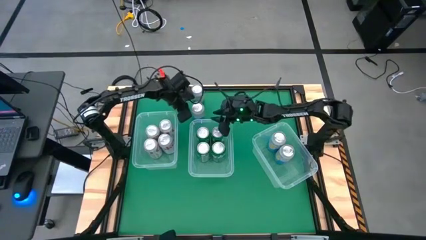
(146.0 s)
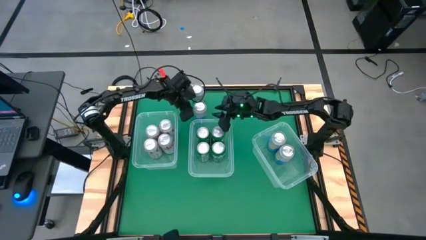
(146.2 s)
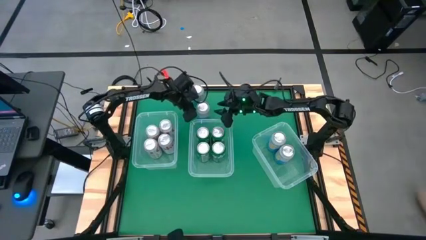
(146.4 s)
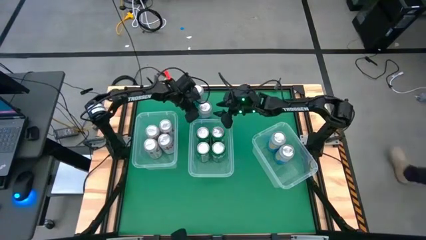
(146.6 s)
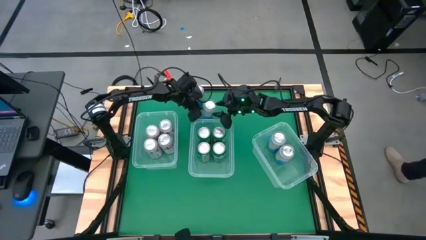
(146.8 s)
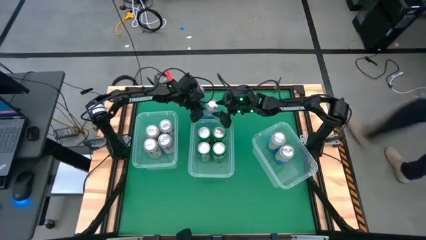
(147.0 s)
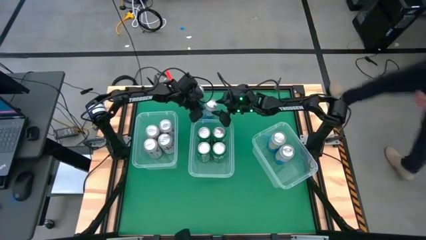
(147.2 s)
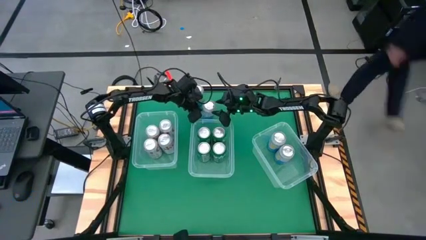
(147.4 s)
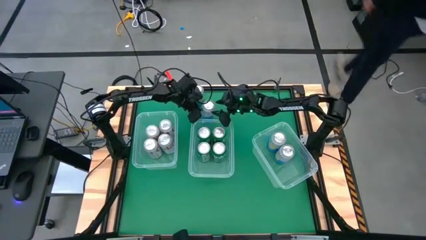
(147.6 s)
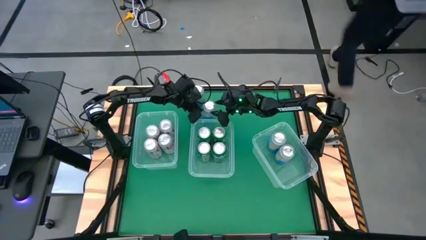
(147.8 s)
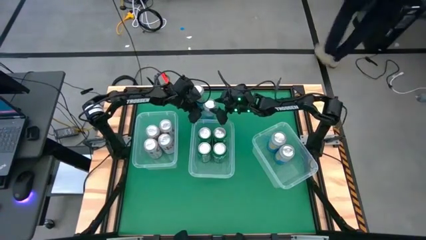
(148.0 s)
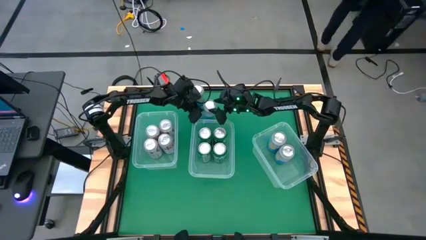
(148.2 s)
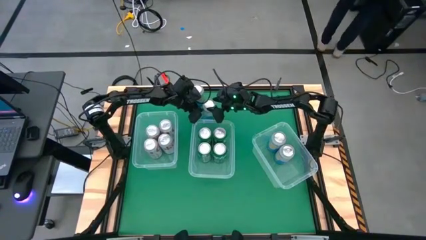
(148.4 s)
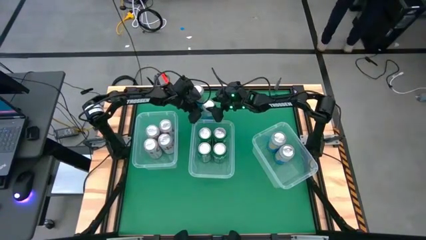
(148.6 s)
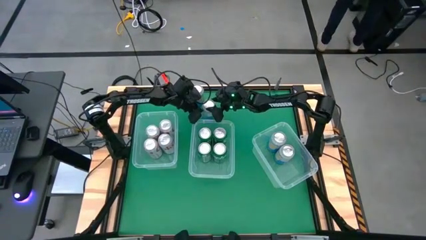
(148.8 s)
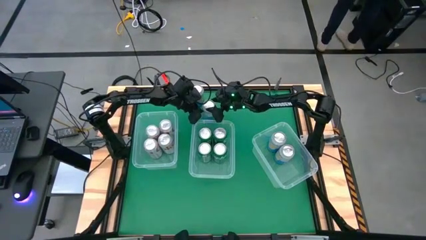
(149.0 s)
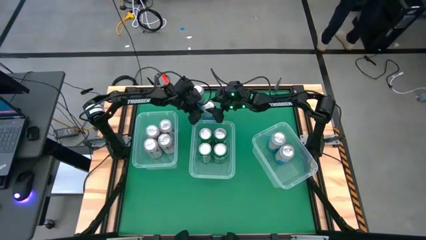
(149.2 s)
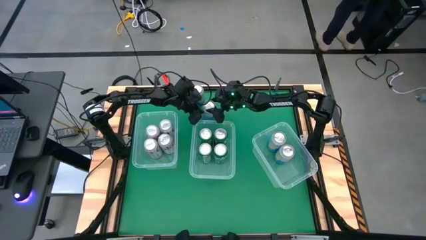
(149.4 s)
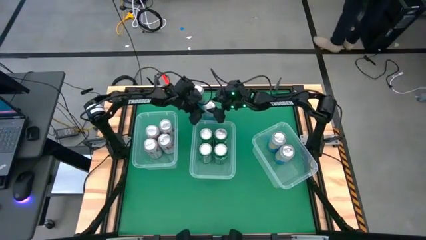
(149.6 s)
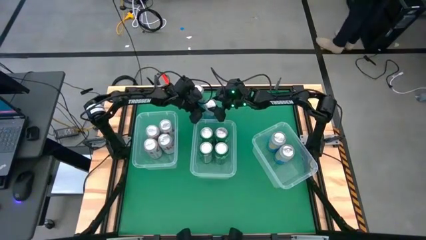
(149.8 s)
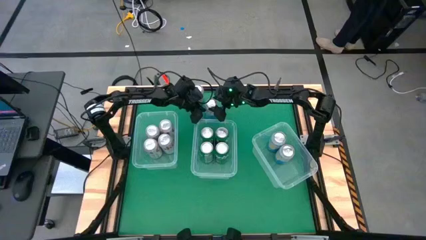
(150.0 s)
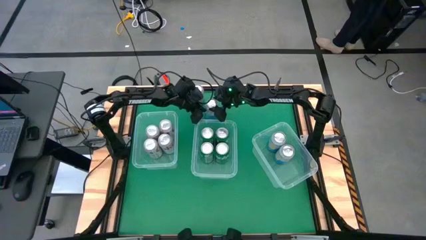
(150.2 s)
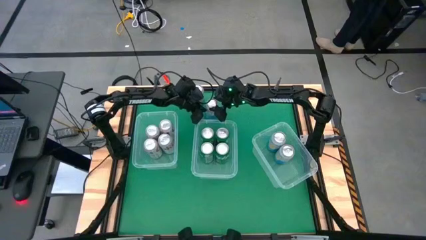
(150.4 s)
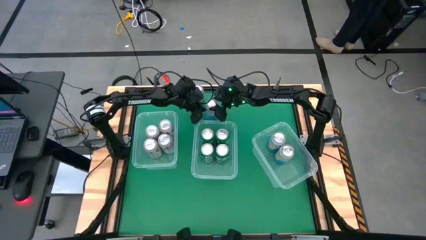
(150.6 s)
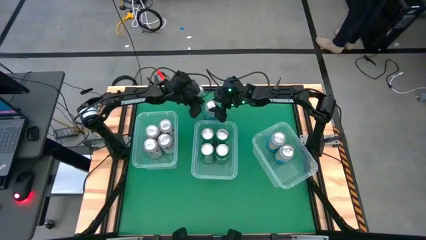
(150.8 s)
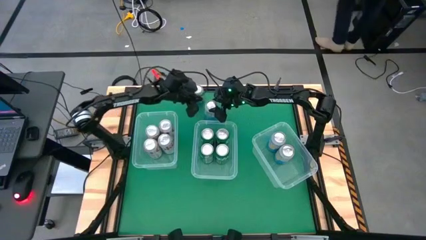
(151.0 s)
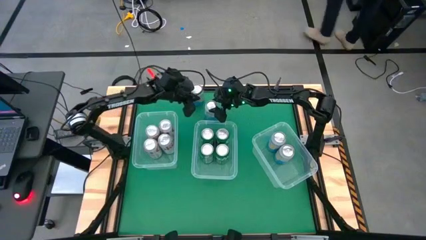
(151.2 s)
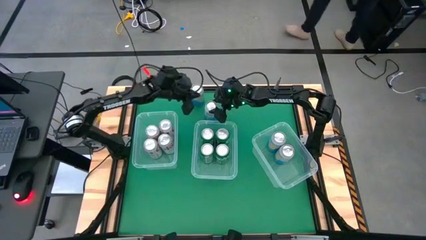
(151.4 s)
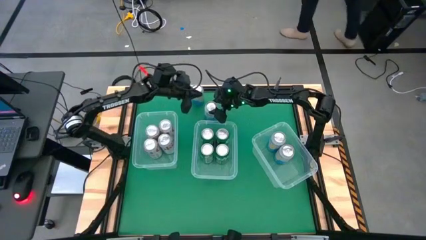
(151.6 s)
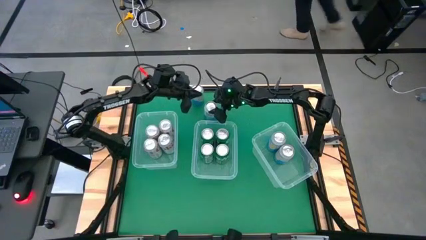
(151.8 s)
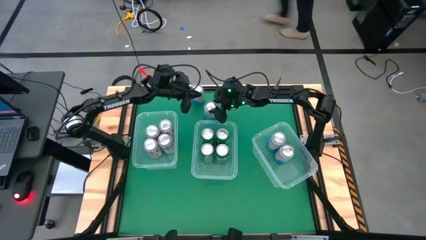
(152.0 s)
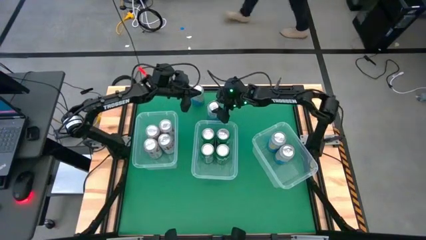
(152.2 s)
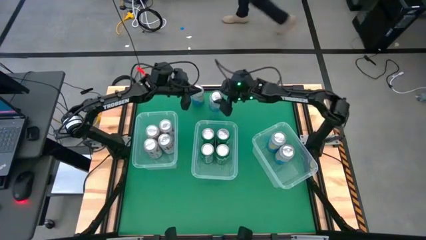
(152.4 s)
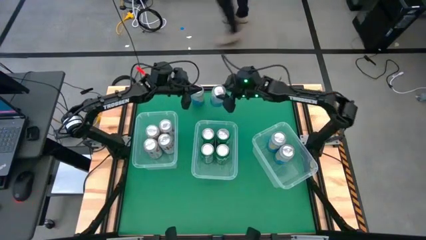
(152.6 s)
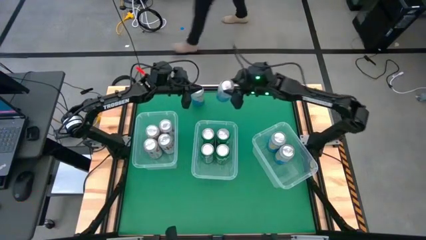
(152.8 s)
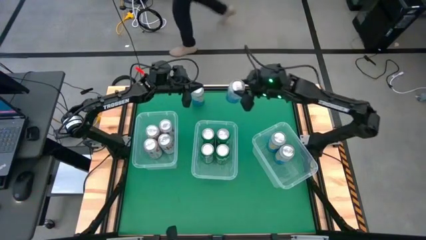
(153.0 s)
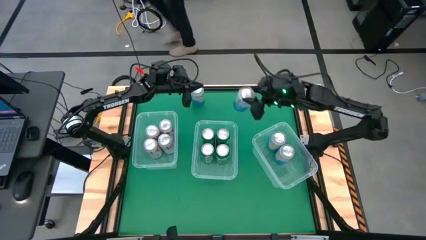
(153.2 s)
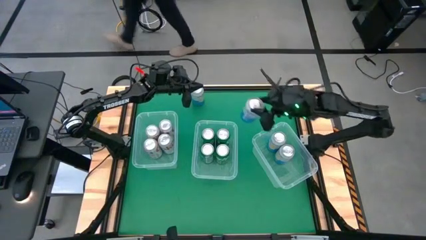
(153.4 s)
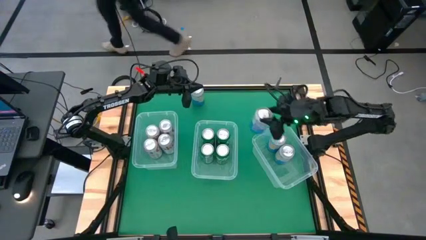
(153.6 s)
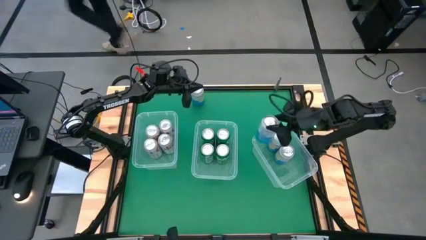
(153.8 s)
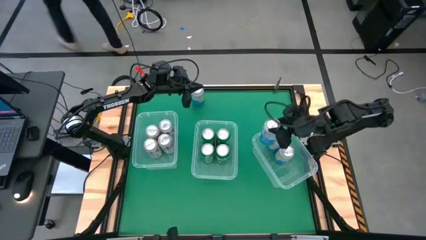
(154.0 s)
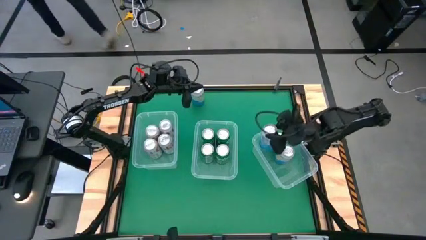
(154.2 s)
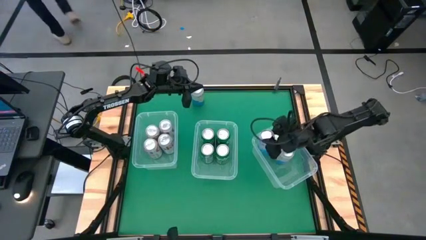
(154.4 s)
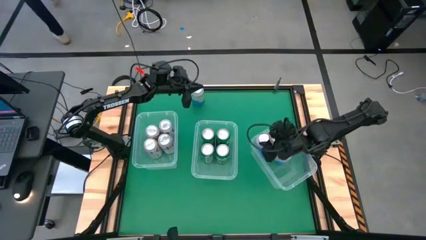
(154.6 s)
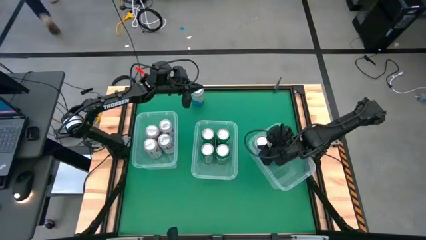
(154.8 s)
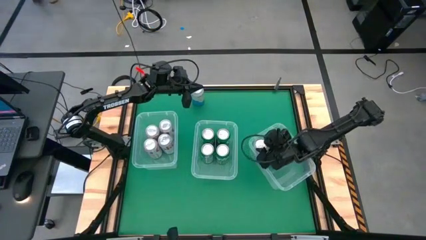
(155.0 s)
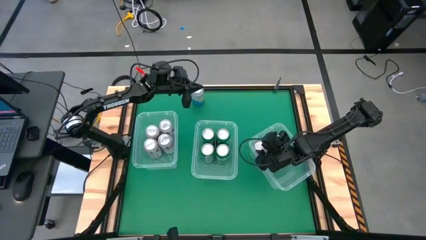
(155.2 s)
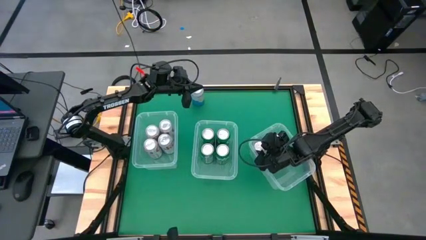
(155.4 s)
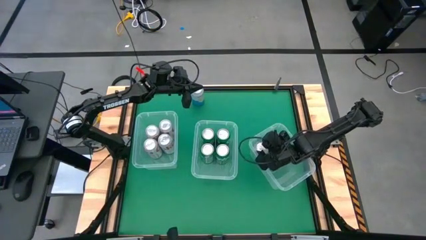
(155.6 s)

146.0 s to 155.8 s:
Task: Sort soda cans
Put the blue soda can into the button right bin

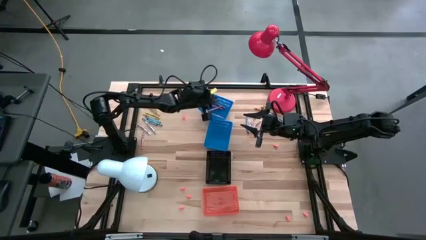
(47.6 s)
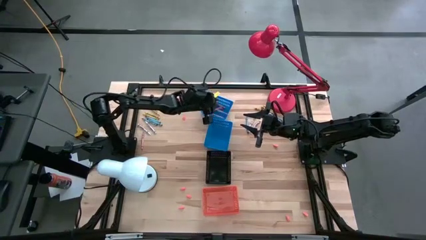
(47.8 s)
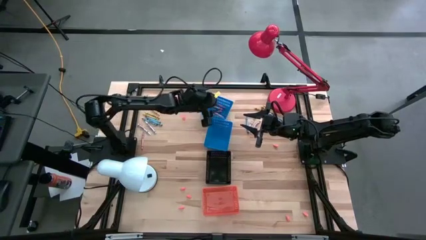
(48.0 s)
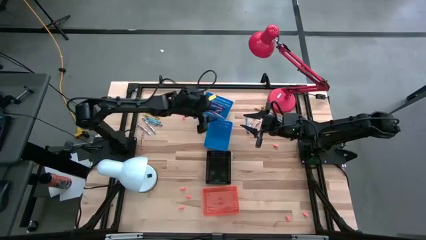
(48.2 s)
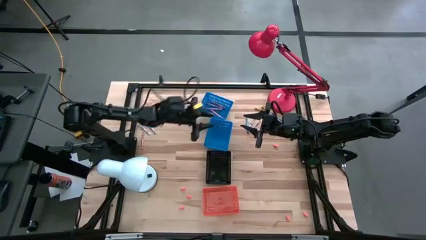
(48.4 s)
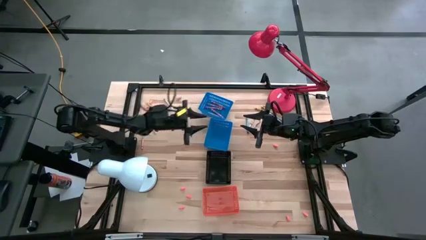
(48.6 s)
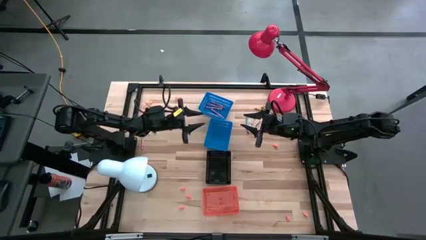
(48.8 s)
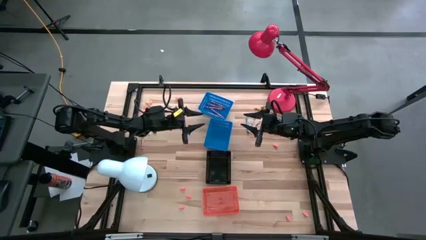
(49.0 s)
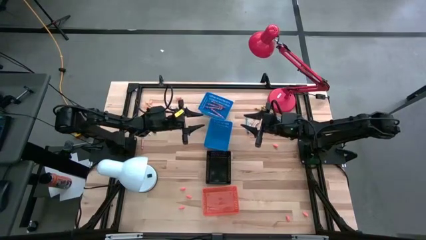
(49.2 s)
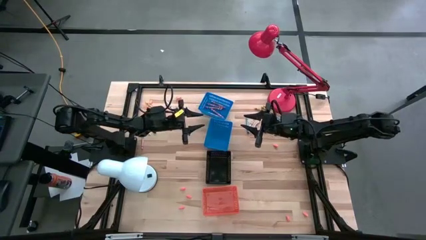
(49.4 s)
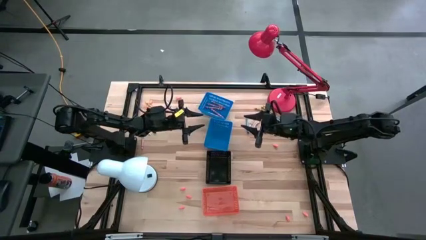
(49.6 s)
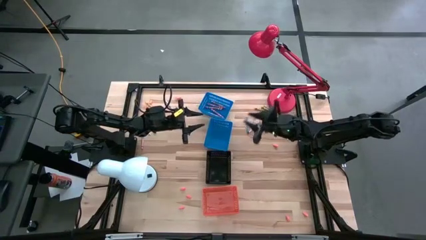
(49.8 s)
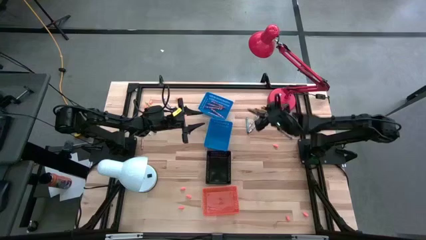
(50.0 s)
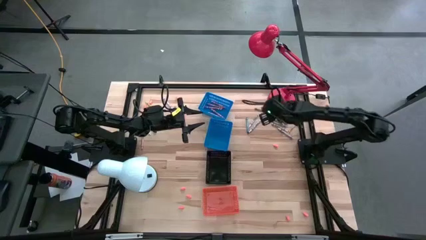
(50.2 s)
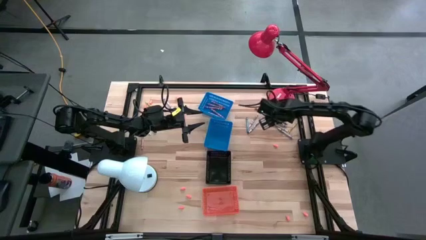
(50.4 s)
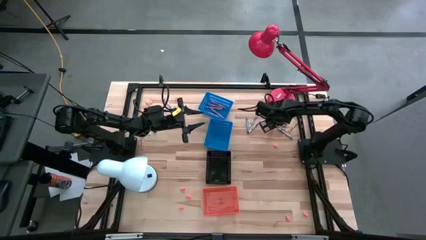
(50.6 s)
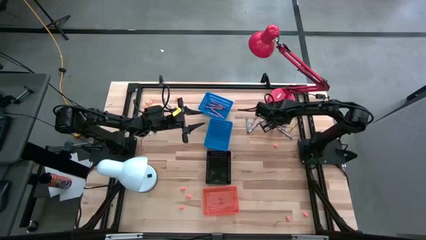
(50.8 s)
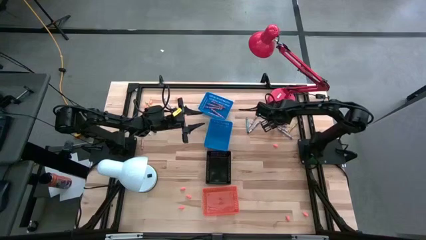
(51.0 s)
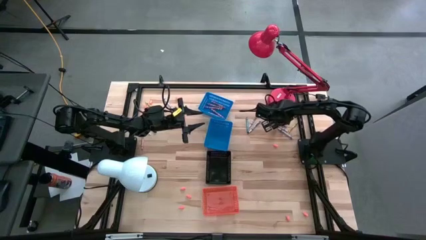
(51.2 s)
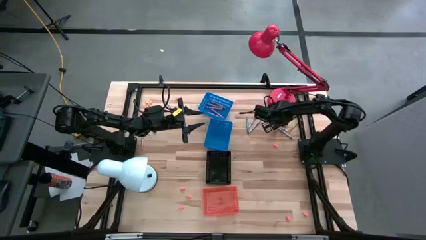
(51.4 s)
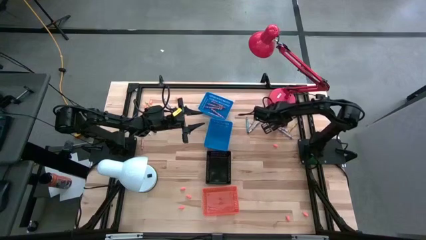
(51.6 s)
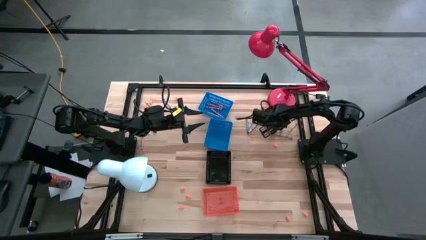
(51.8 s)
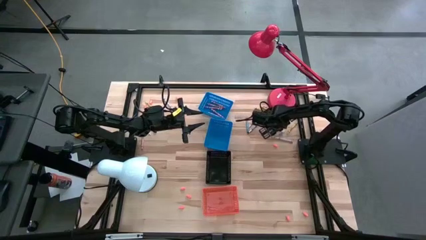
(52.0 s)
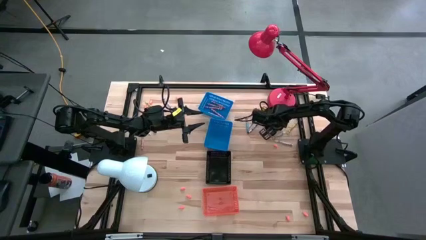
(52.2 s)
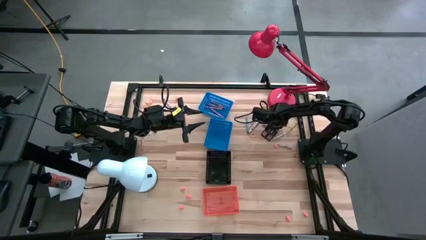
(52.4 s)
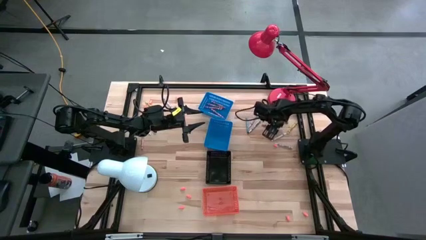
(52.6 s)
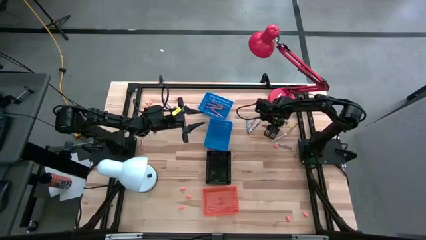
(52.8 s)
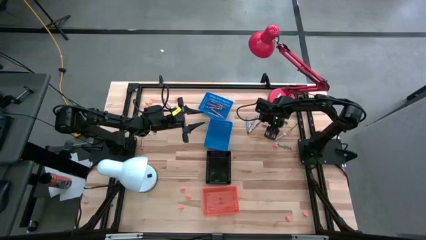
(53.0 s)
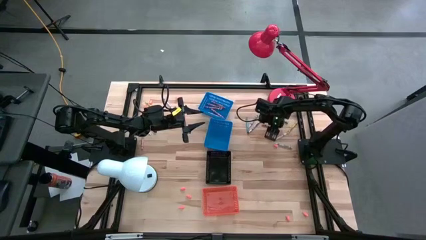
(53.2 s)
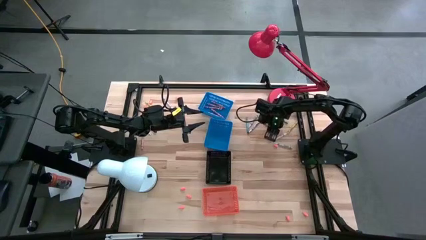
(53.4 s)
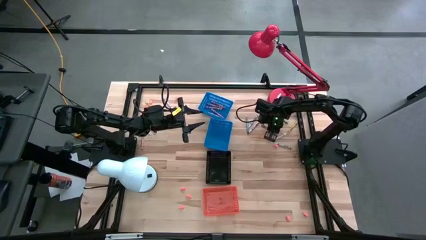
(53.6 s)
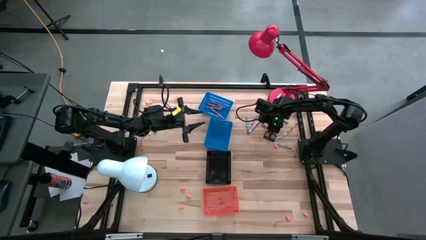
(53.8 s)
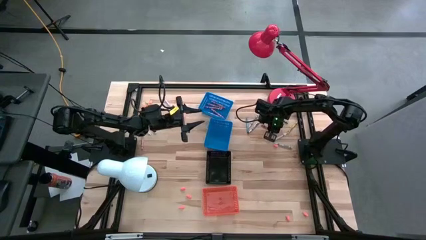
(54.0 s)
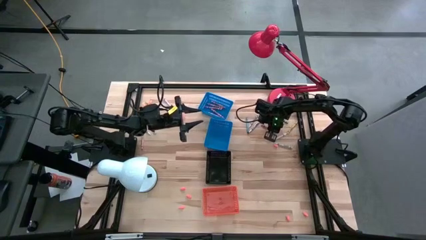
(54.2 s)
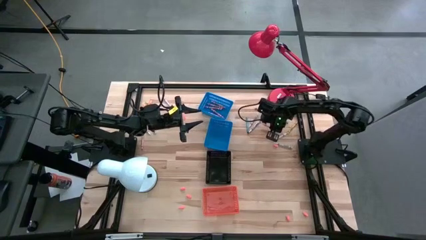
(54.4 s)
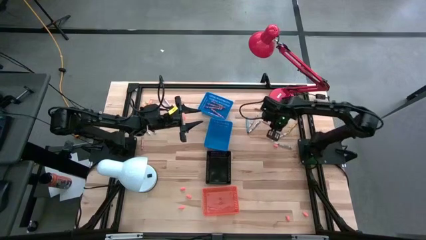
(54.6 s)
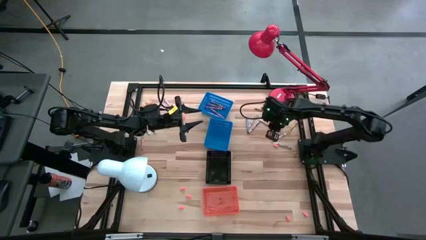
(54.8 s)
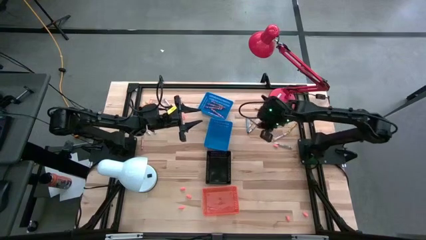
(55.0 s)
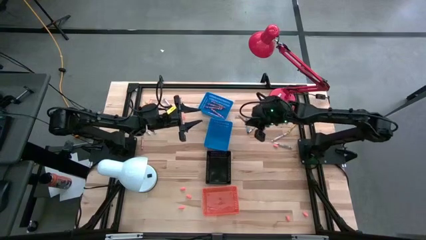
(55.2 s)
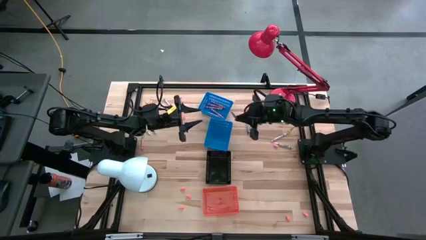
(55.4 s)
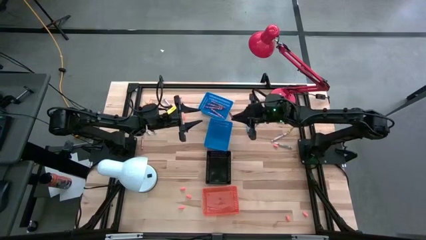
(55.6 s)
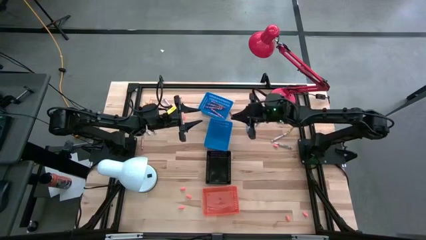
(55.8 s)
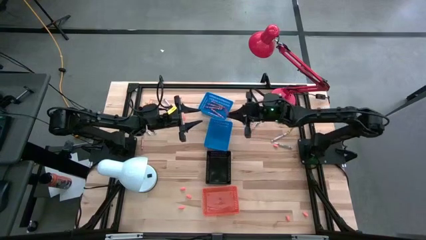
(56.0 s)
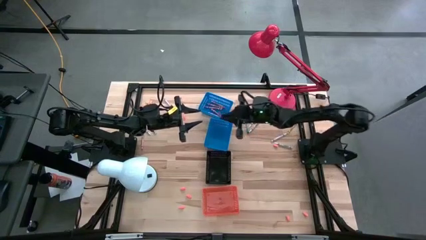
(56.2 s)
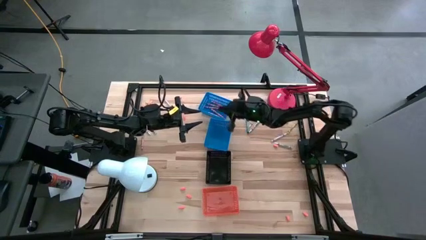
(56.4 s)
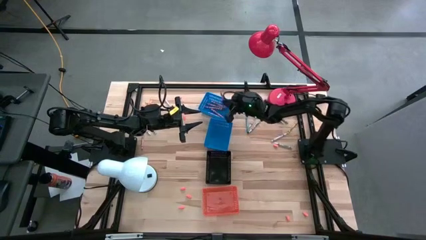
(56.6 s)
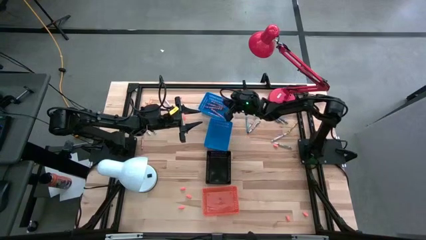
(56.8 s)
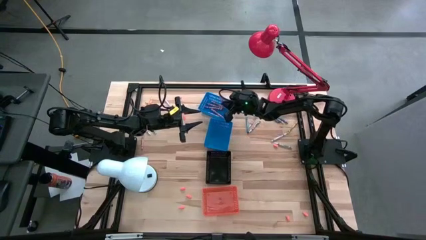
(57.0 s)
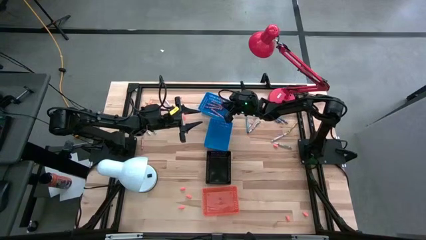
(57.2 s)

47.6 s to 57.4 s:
Task: Sort crayons
Put the pink crayon into the top blue bin
